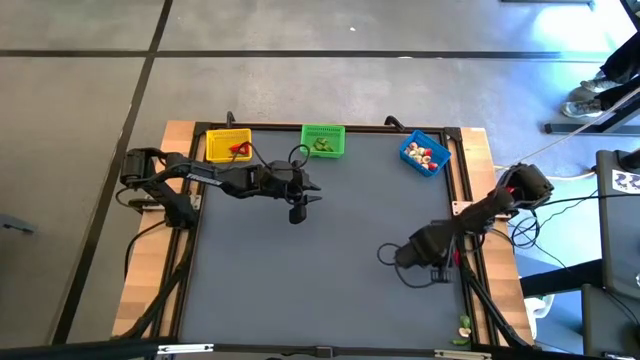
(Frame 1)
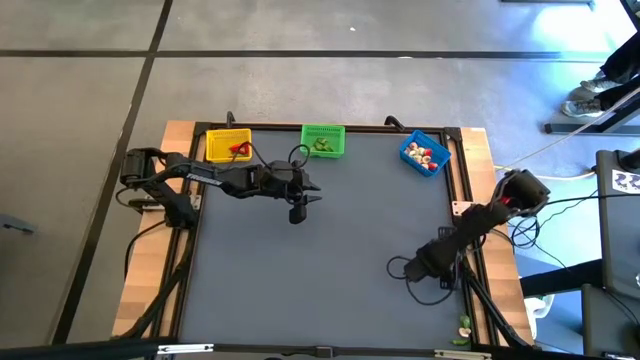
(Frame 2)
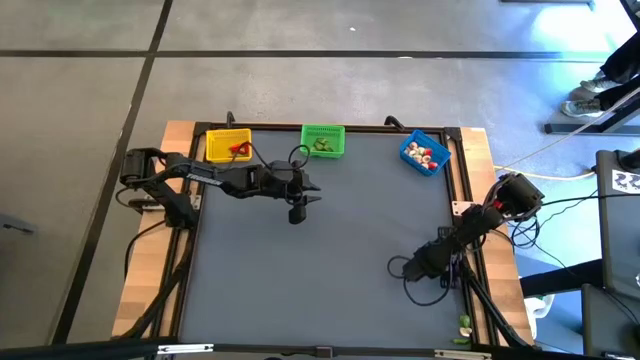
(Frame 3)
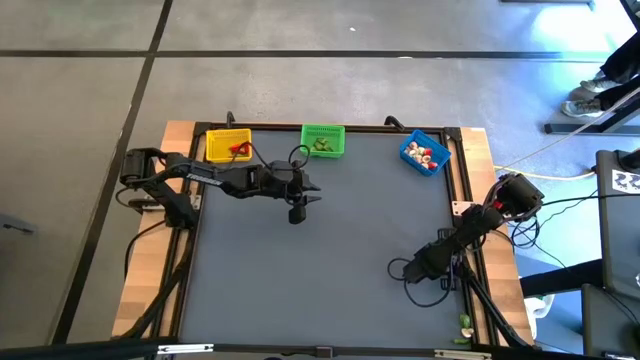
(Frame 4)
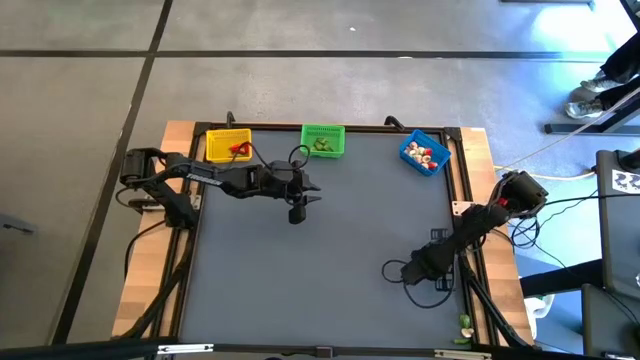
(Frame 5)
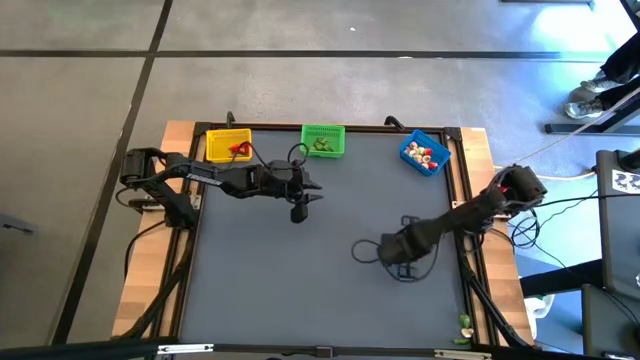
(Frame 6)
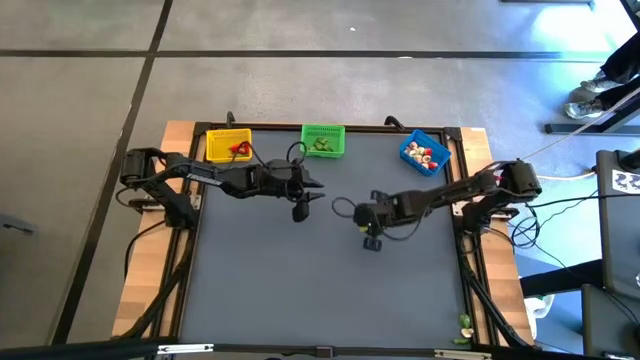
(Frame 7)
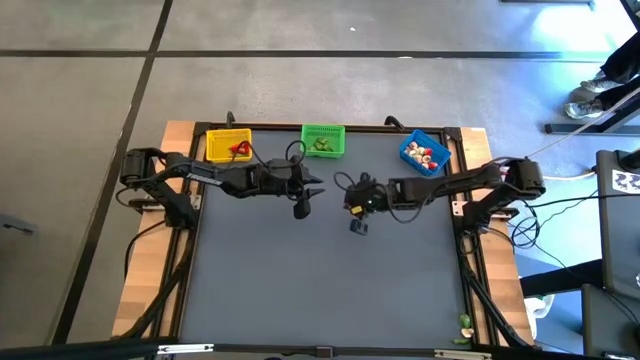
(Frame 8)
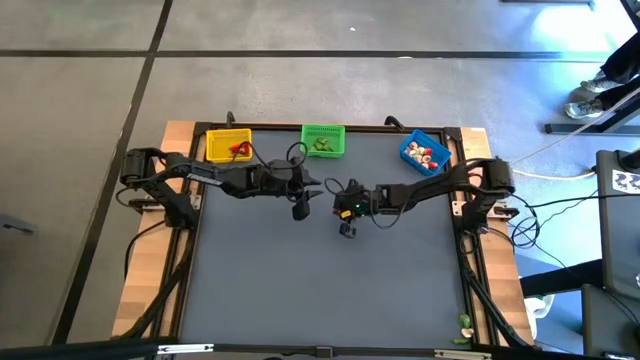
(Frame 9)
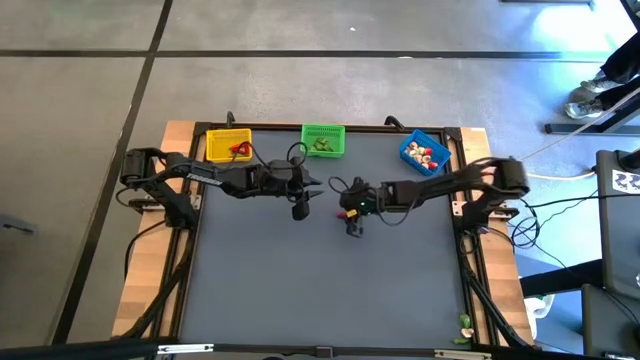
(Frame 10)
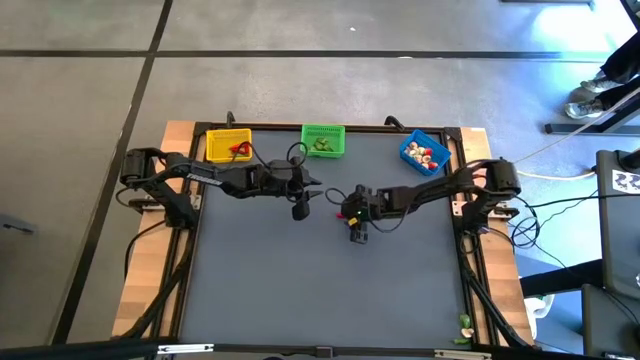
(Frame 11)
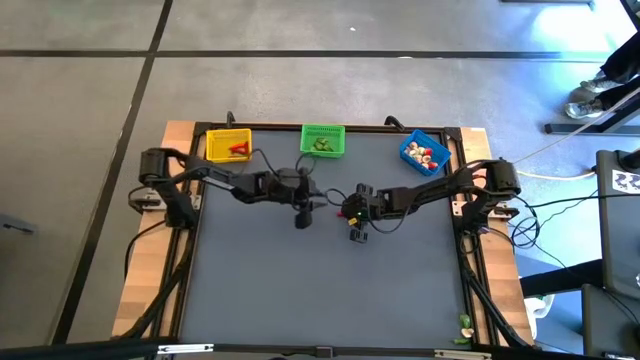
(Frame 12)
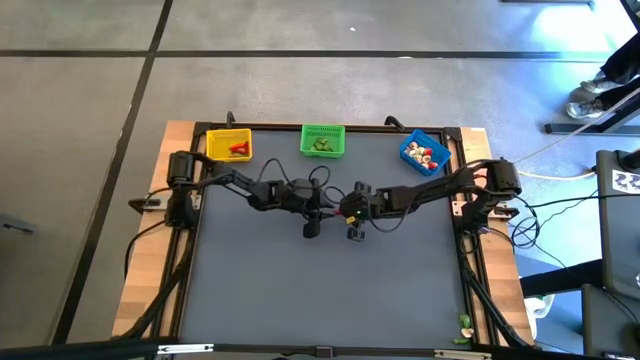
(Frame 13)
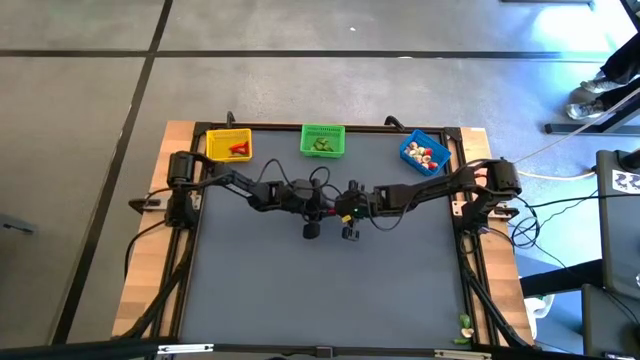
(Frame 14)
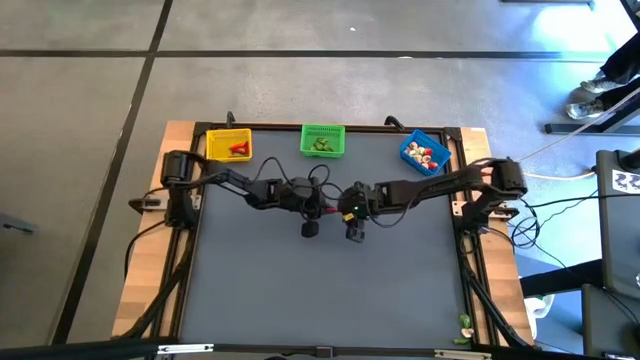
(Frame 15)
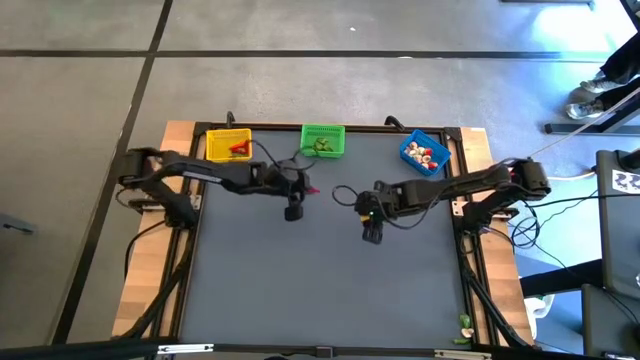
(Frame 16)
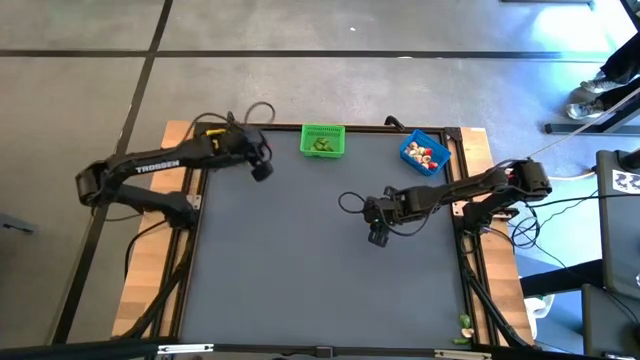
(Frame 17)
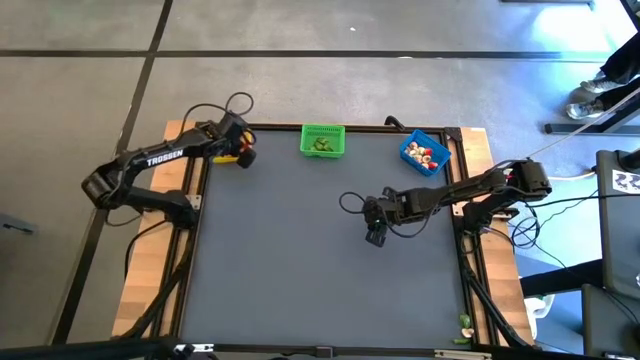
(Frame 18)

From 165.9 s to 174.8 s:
Task: Sort produce into baskets
Put the red chili pepper into the yellow basket

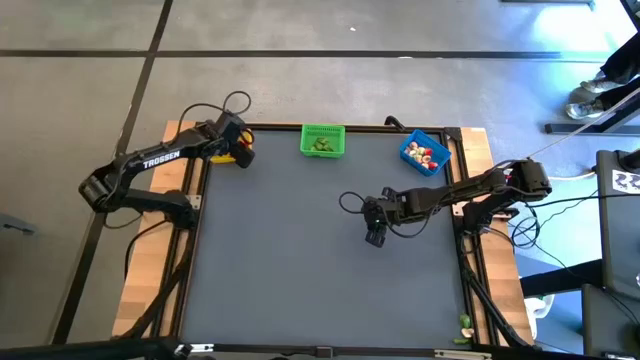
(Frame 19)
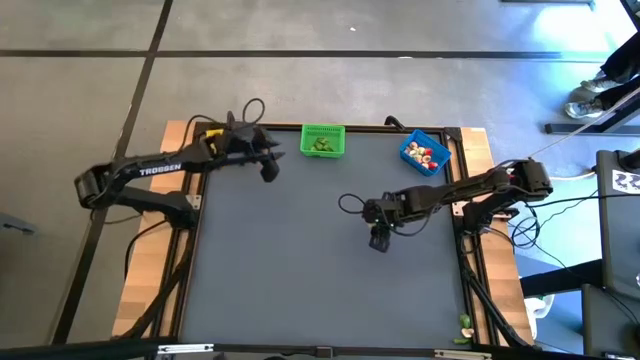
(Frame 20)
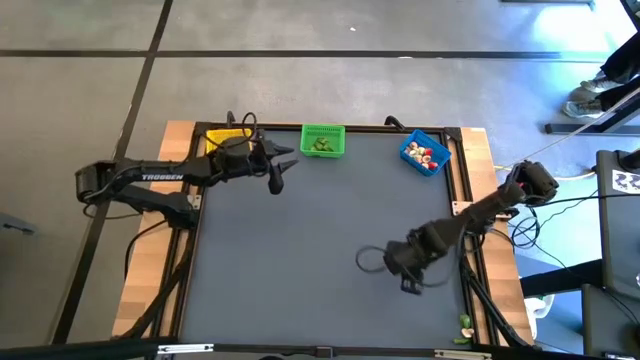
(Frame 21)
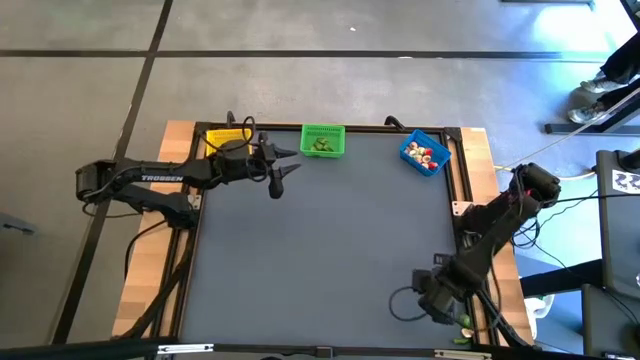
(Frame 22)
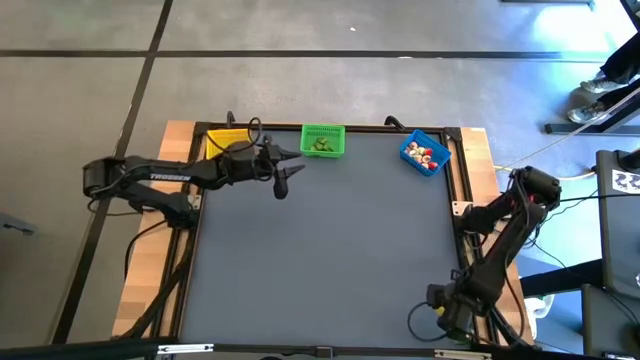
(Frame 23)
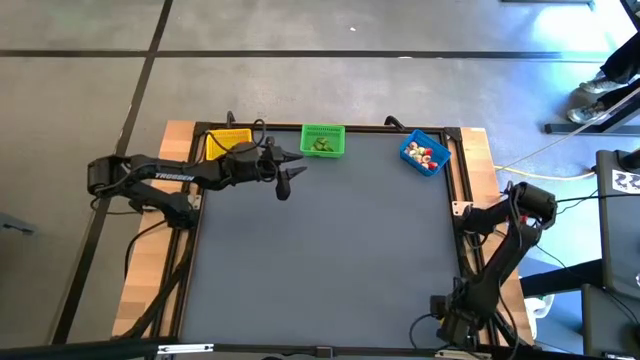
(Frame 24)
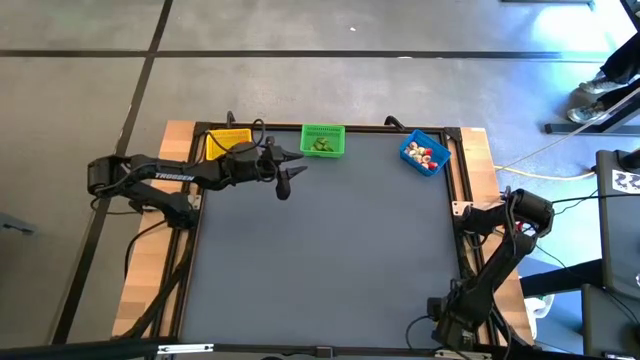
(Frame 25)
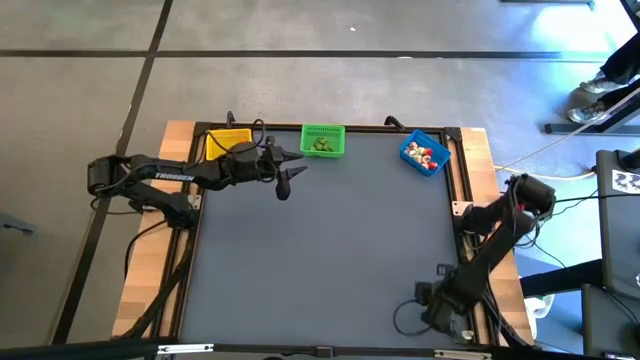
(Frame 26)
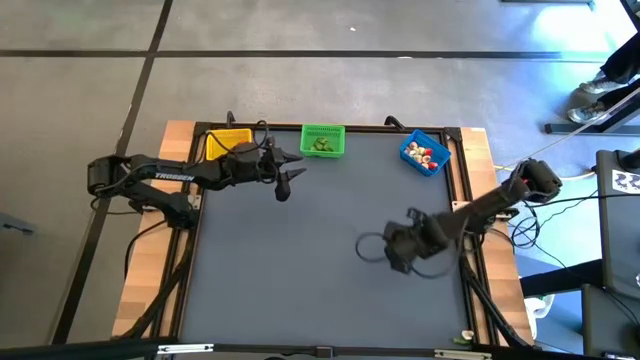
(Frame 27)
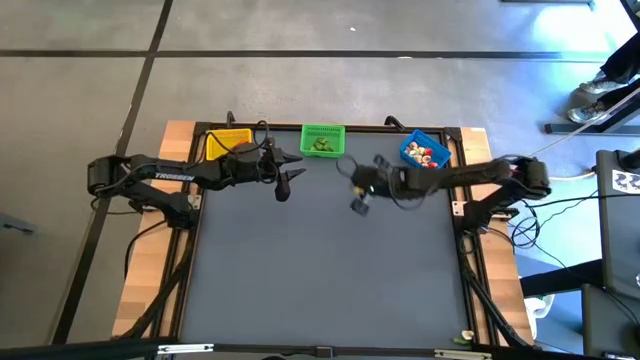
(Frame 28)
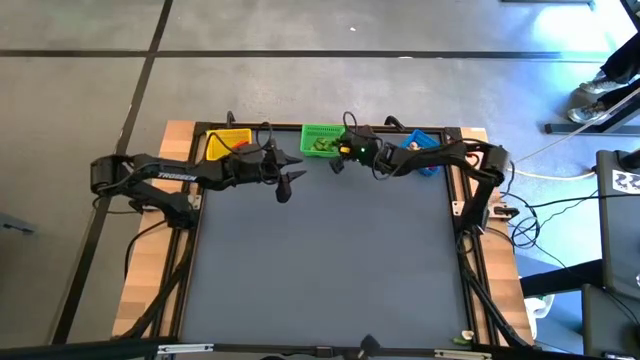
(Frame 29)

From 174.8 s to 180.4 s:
Put the small green chili pepper into the green basket

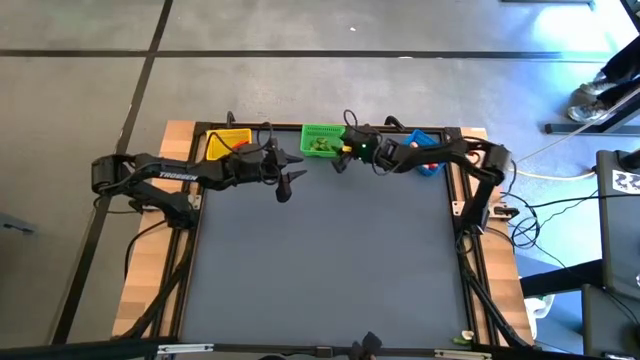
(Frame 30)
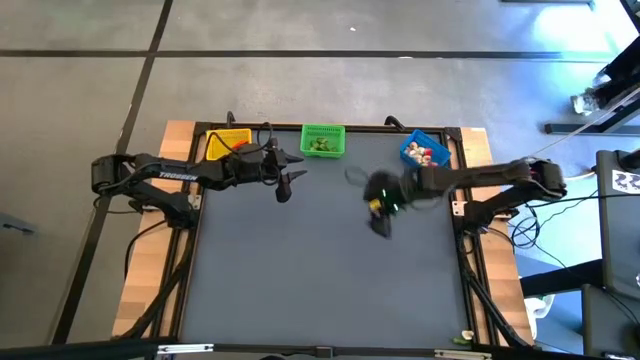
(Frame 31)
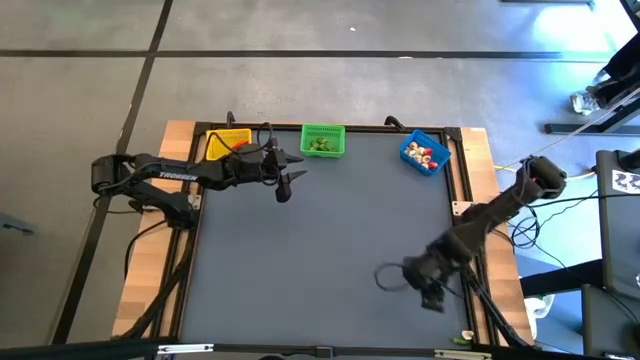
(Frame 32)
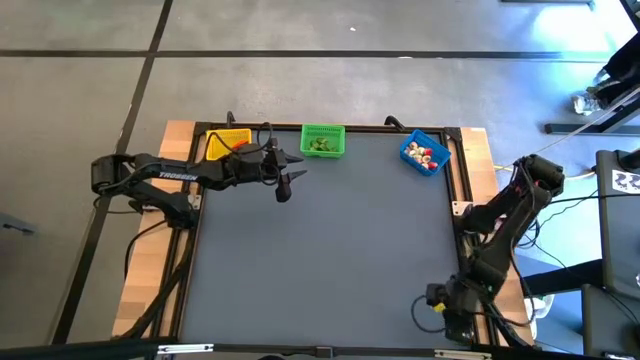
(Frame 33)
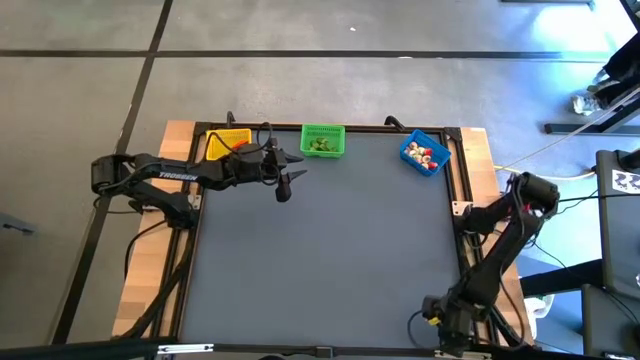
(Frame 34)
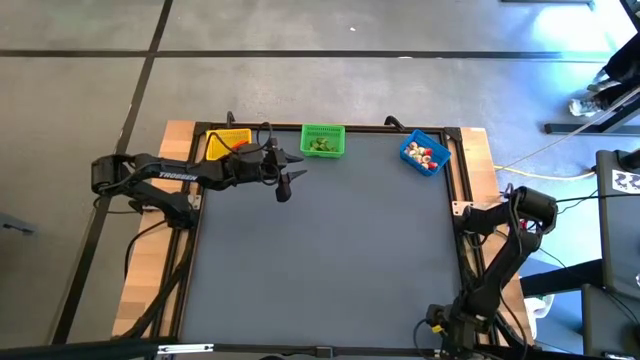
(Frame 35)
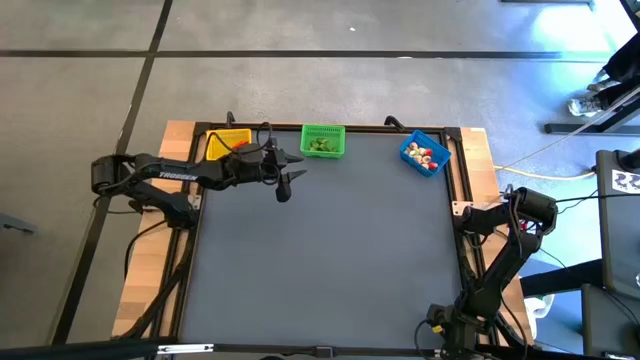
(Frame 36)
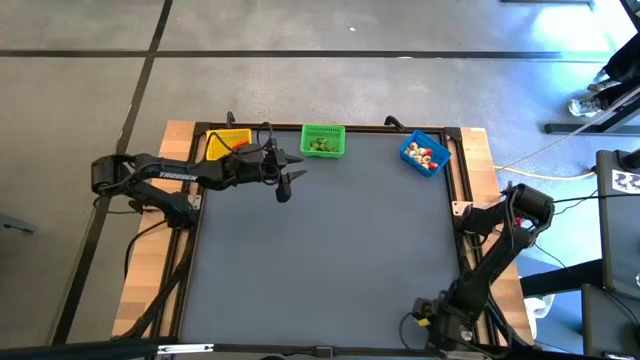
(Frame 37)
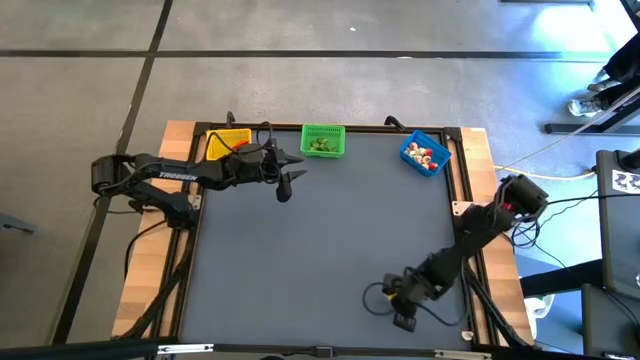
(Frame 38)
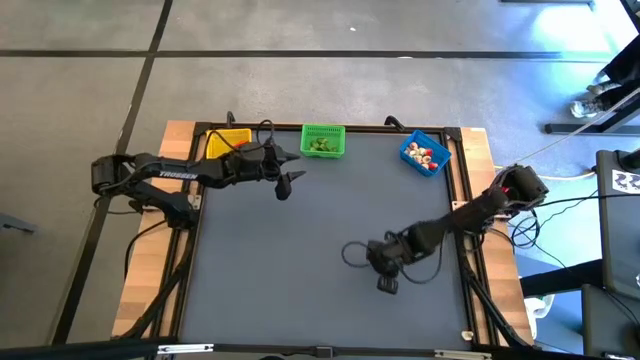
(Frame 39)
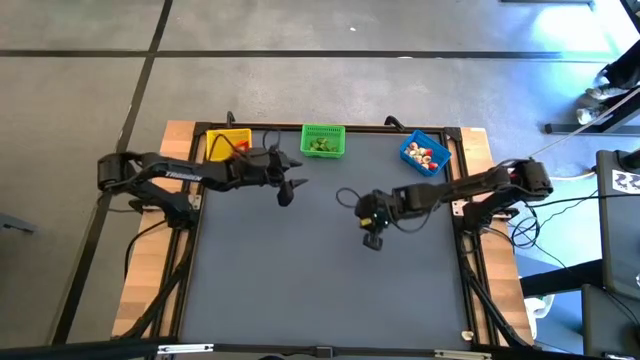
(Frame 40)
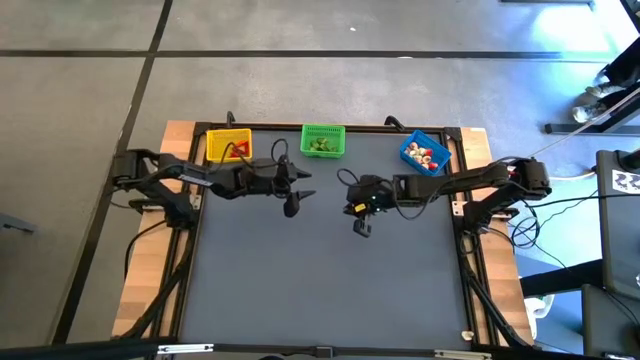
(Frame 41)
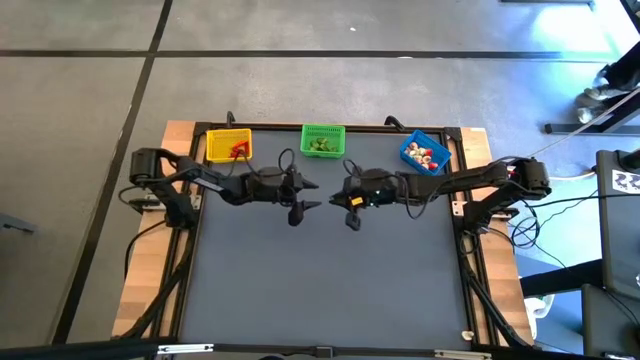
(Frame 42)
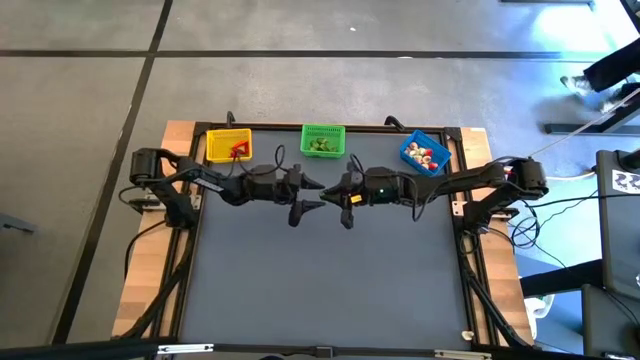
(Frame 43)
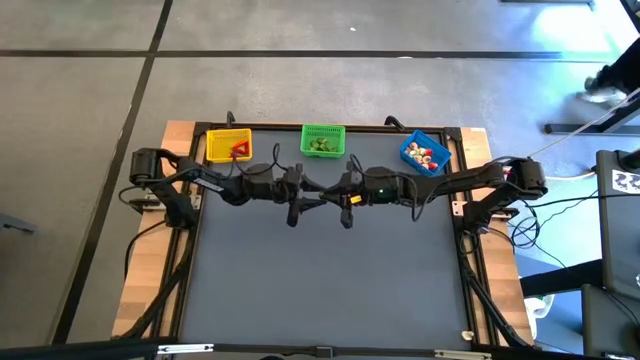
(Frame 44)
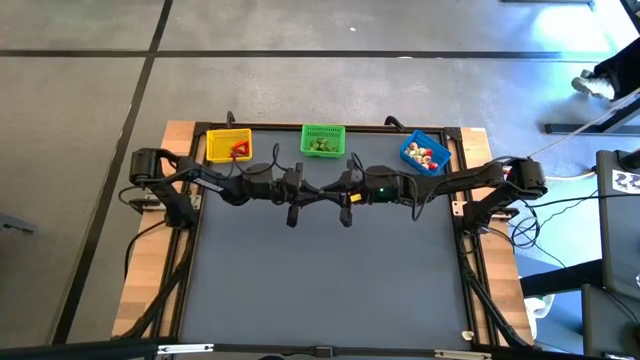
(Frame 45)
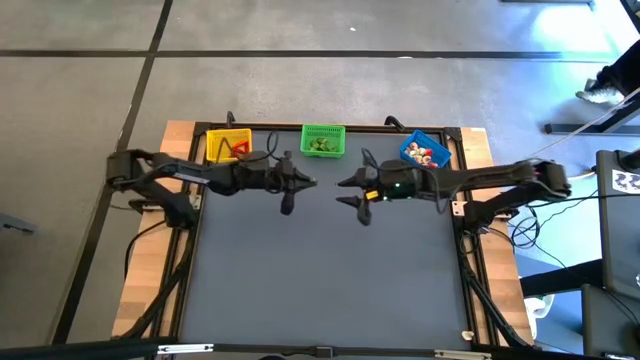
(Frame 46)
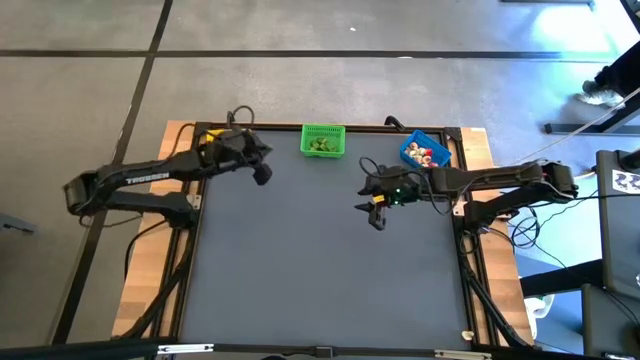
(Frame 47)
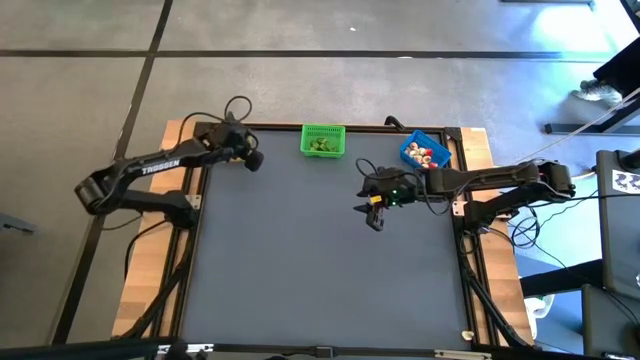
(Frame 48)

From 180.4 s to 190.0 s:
Put the green chili pepper into the yellow basket
